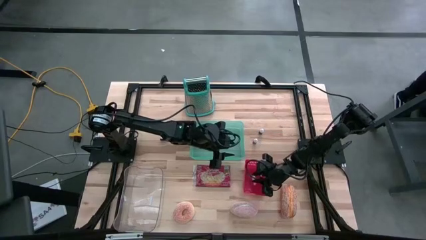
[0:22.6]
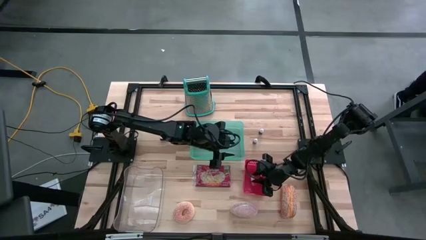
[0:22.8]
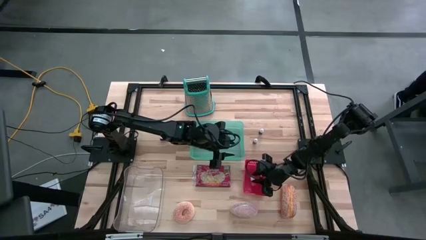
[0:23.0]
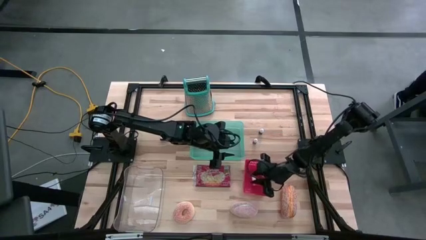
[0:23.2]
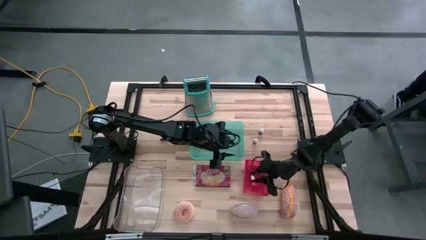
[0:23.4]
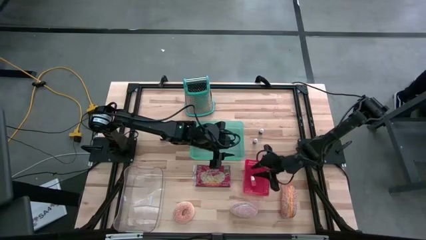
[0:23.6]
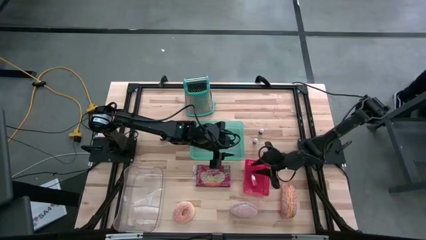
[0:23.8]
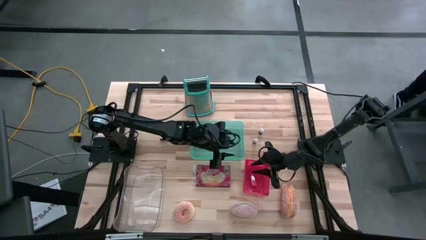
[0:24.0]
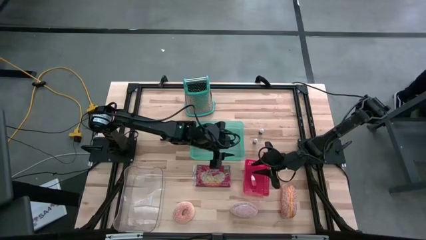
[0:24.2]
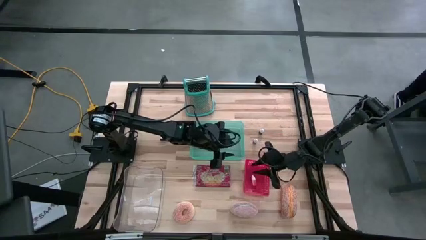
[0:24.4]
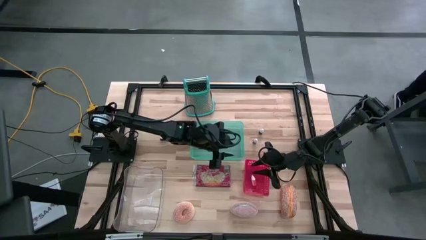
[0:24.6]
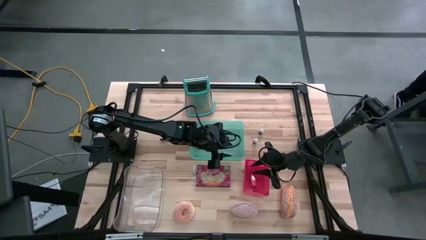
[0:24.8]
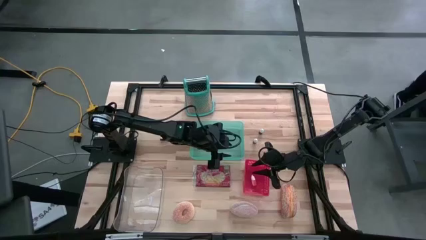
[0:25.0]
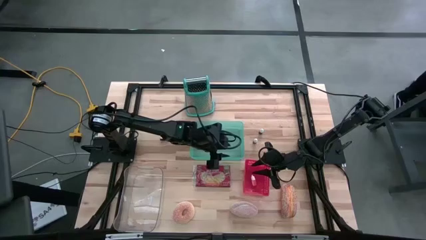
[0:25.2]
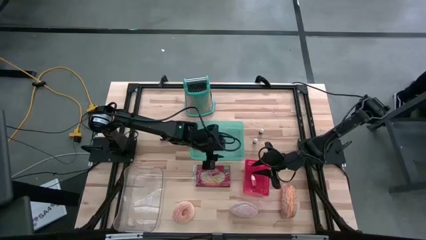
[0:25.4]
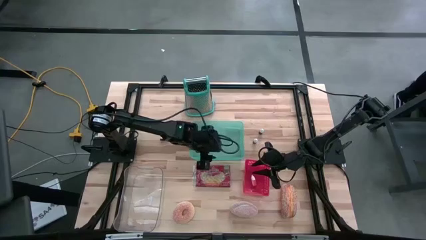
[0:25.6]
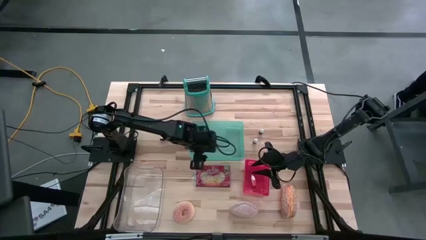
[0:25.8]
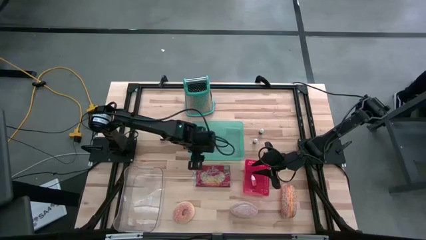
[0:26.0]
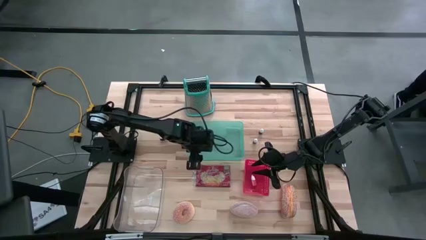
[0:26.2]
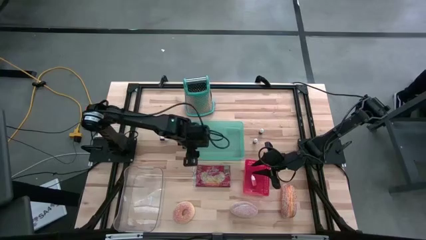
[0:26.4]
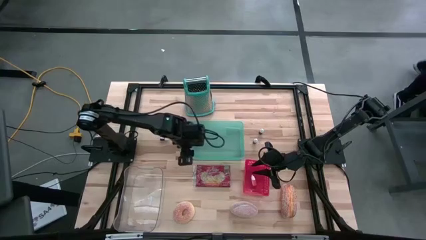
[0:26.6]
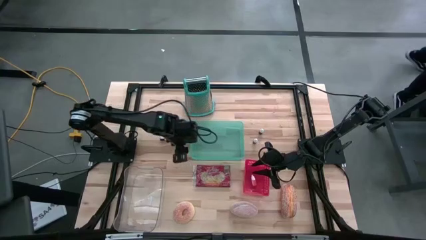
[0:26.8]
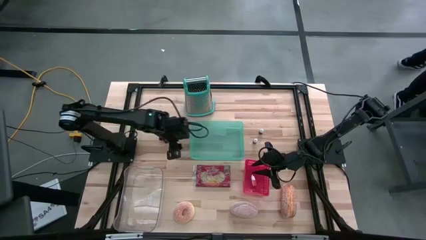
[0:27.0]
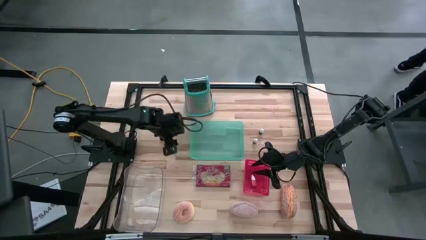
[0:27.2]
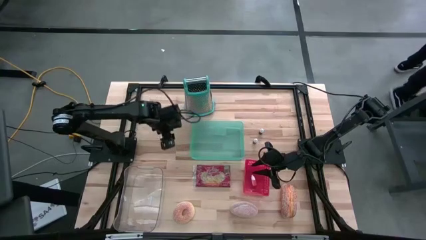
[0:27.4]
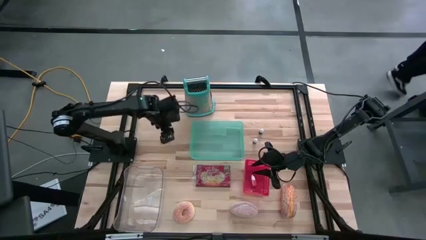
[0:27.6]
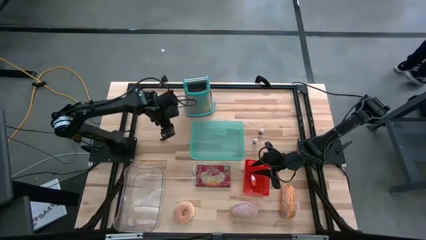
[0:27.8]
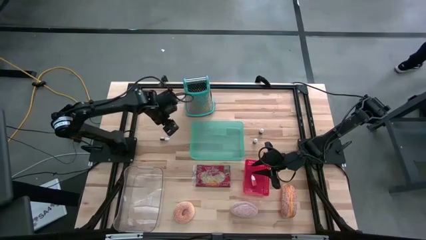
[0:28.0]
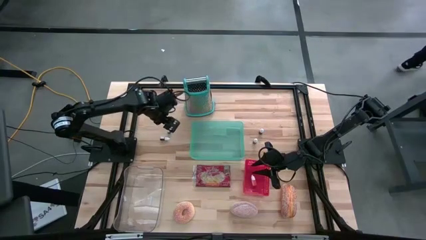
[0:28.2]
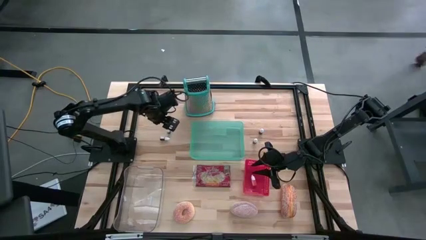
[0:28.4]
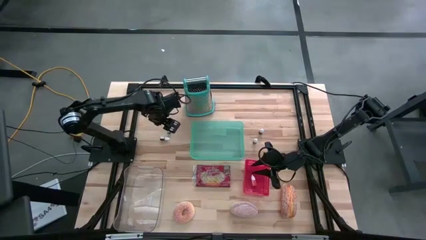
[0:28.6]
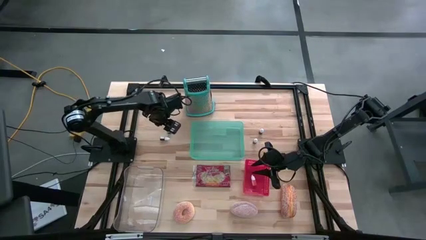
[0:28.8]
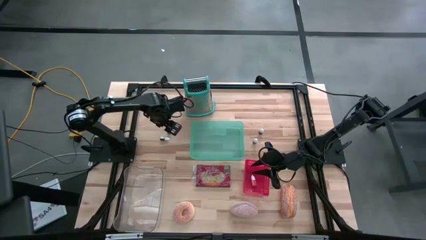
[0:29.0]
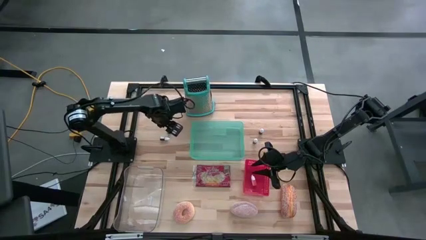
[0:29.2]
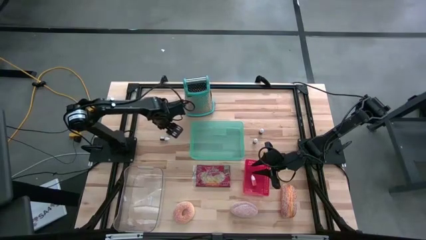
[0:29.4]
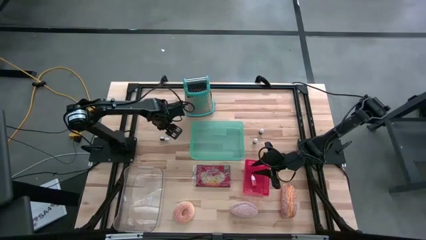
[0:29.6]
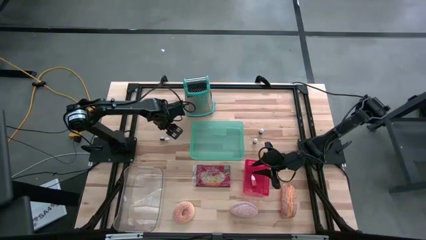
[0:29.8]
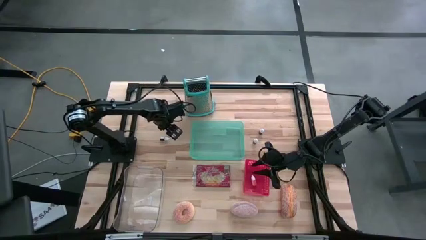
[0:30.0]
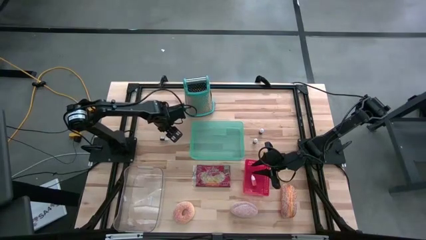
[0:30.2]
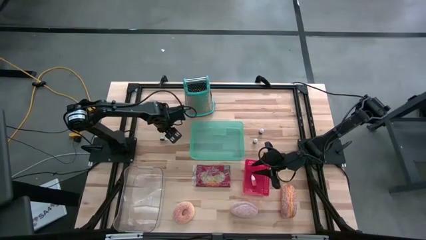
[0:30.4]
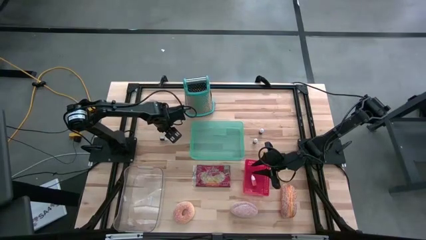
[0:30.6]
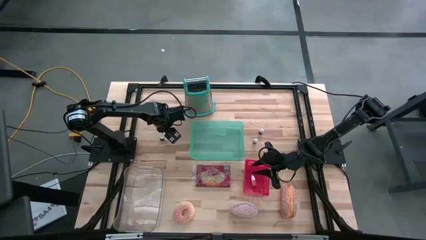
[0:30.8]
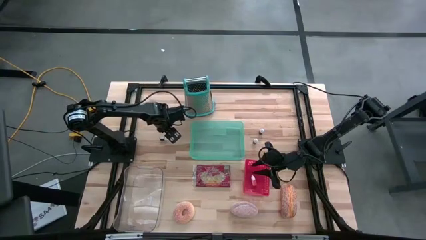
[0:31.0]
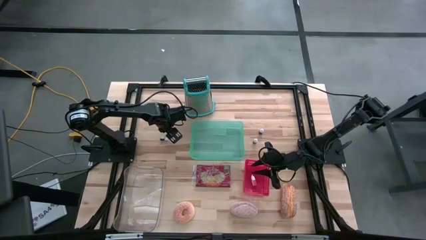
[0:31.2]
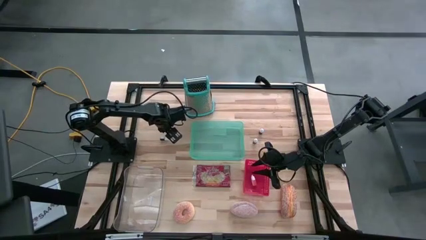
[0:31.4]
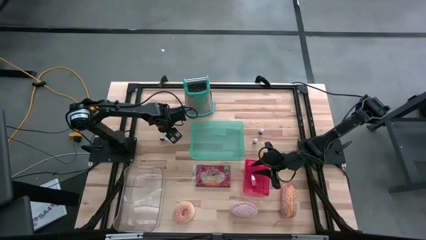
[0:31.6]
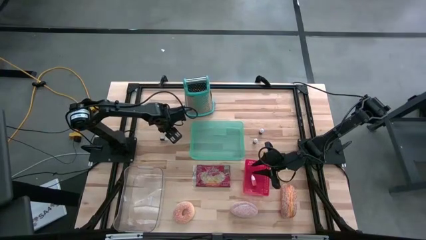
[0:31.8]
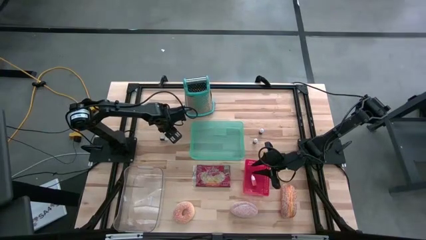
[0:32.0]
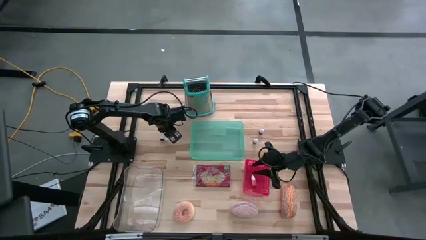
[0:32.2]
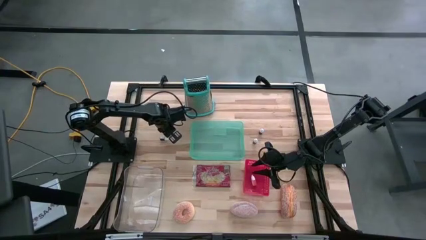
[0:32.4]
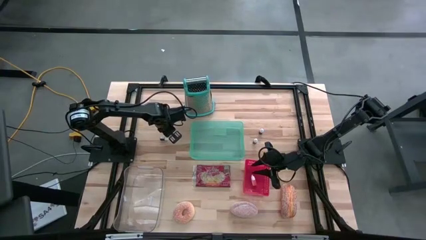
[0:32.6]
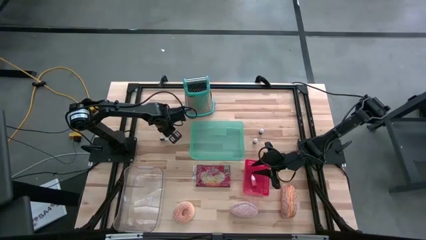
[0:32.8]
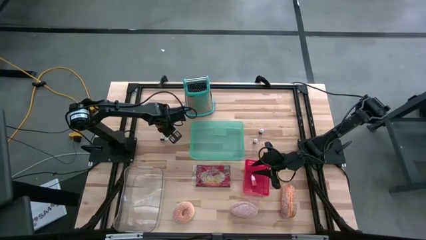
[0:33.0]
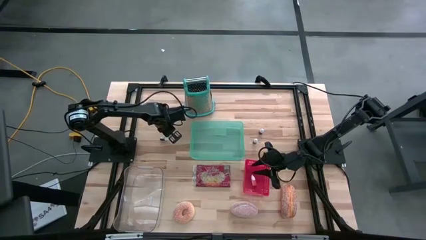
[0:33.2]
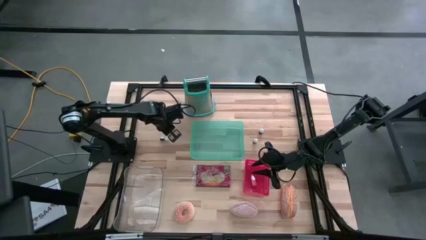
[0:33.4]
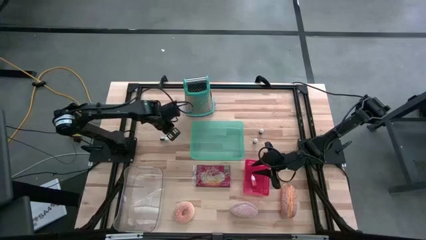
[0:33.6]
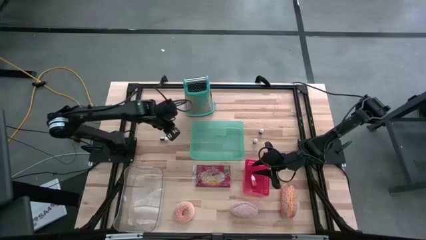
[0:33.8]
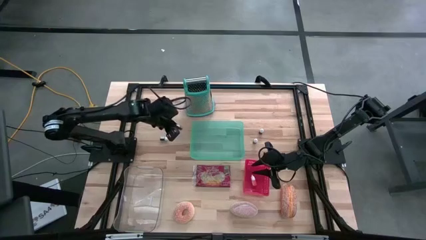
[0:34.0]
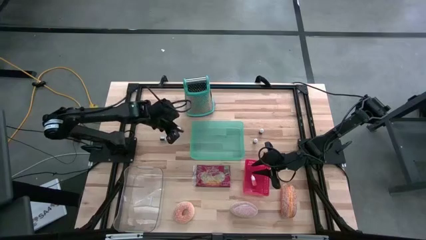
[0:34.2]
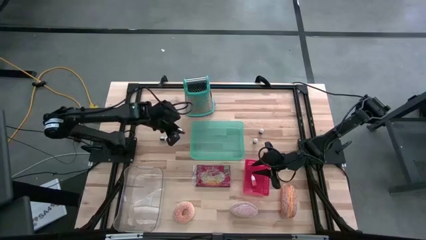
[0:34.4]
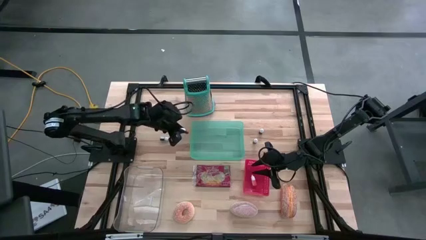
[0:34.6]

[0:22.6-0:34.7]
Task: Pick & Place Food Item
Put the yellow food coloring bottle into the red bin

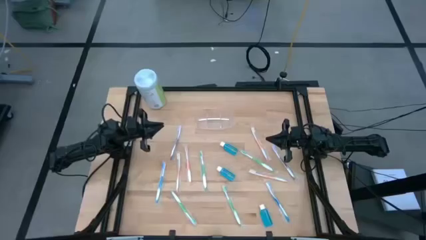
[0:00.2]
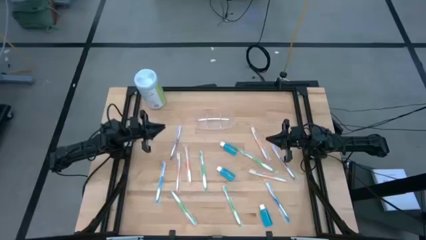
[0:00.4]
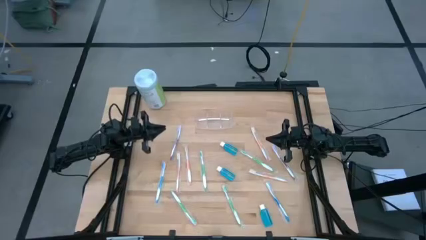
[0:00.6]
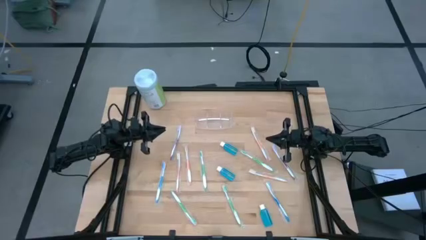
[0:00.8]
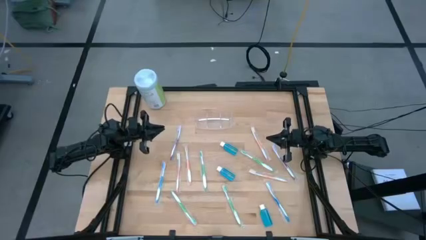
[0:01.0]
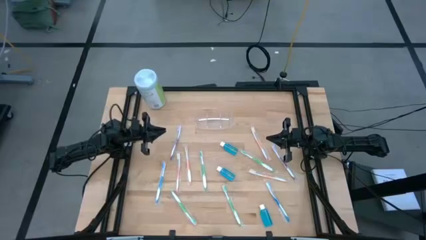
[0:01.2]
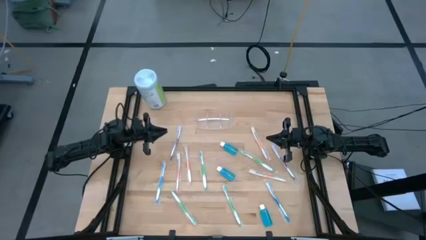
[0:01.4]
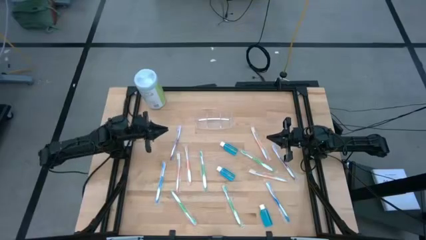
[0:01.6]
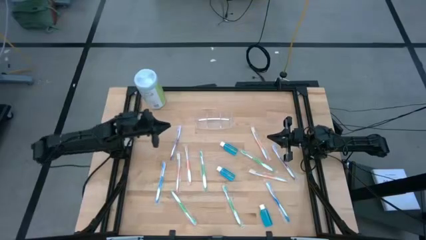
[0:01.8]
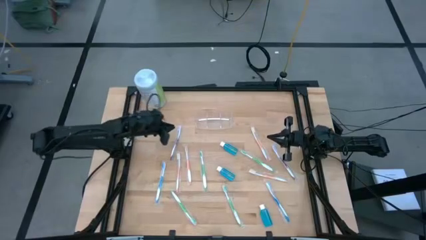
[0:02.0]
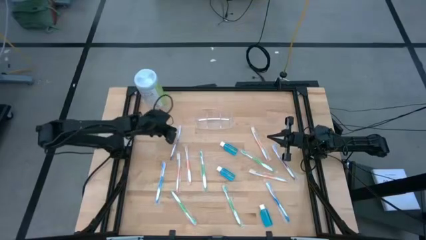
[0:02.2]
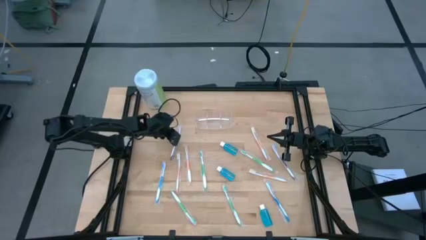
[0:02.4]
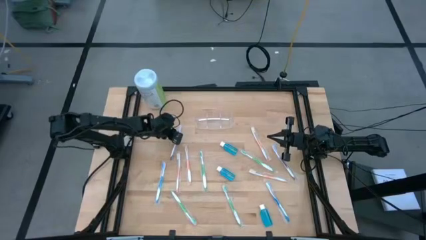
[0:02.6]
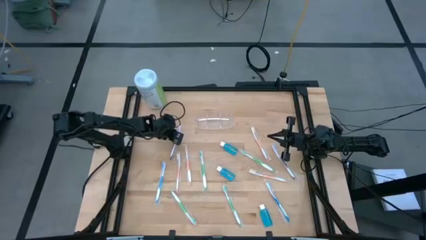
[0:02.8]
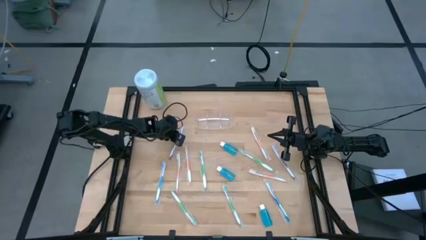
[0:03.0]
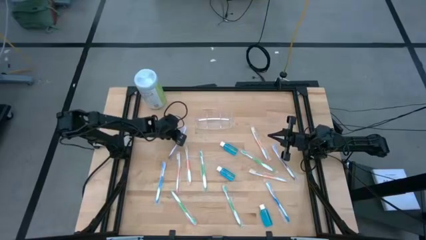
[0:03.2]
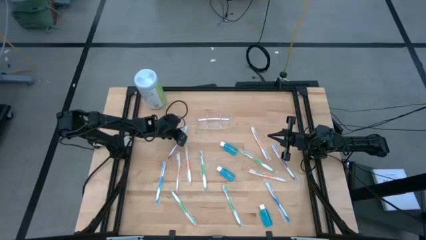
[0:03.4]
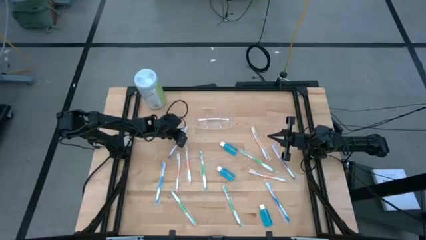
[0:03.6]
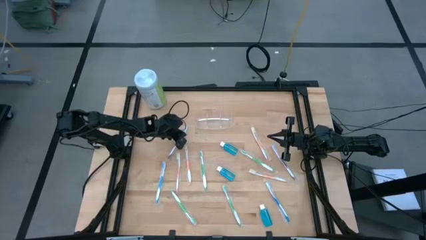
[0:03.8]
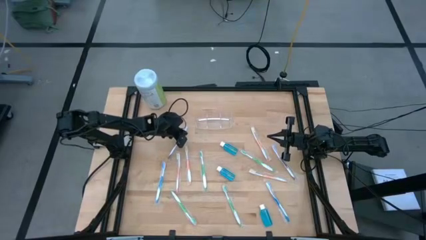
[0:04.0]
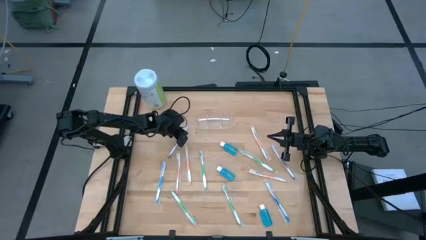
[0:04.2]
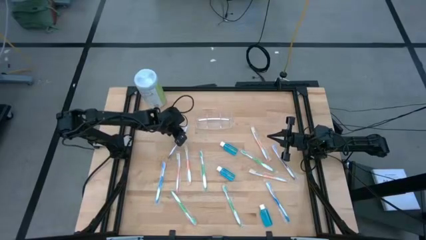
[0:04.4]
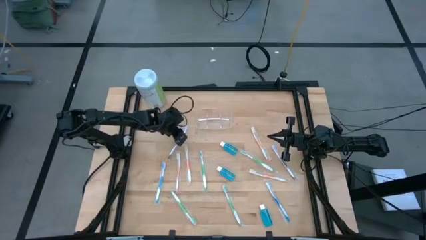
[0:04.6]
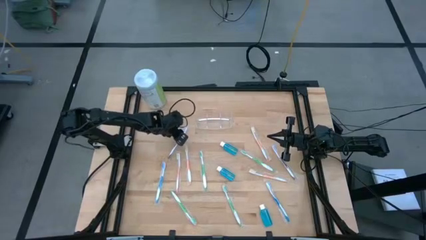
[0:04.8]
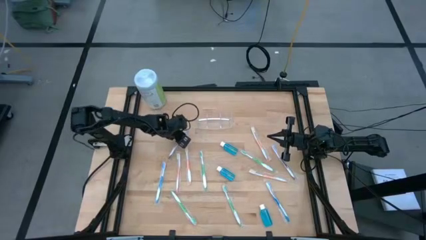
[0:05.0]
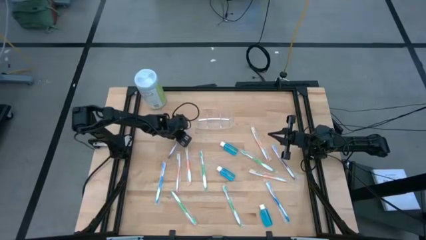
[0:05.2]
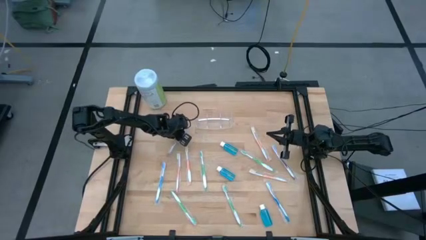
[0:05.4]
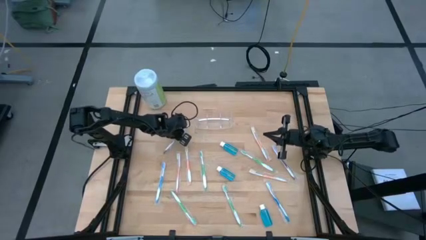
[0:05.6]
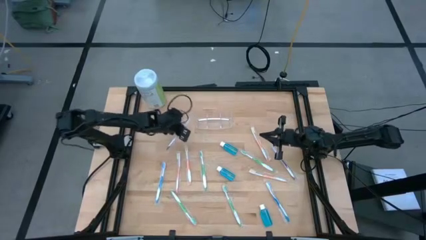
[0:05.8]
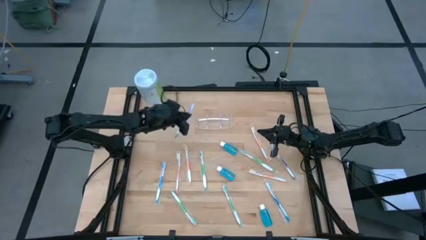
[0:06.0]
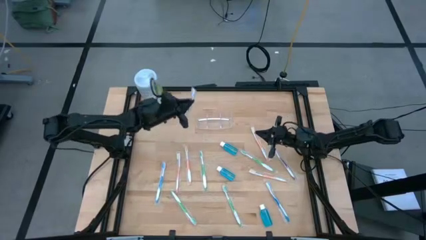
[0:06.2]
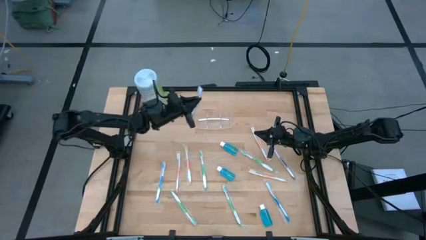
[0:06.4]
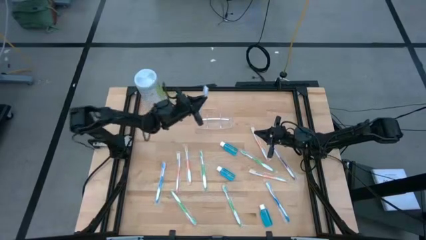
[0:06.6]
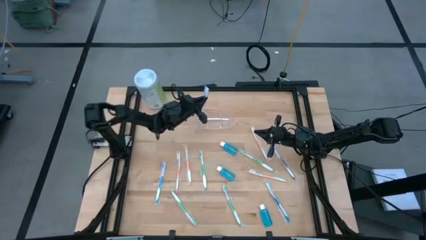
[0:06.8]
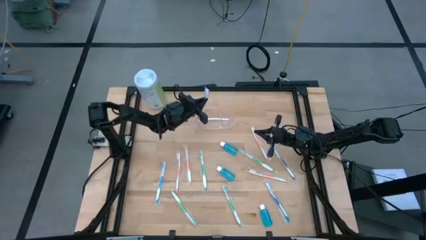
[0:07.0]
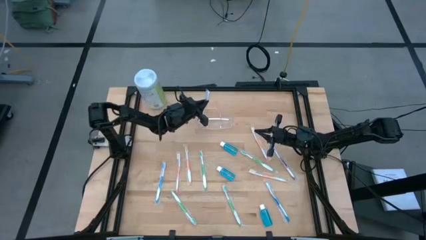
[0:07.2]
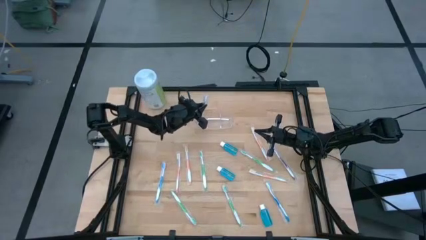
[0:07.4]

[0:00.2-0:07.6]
Task: Pick & Place toothbrushing station
Put the purple toothbrush to the left of the transparent organizer
